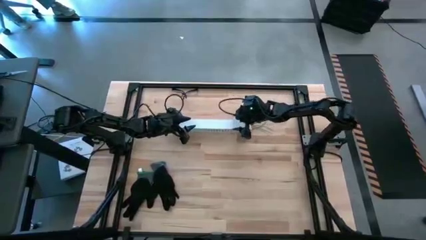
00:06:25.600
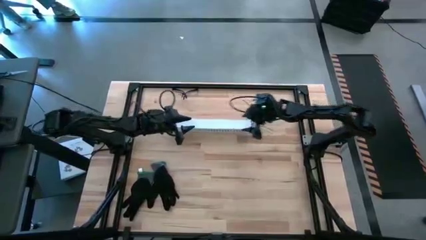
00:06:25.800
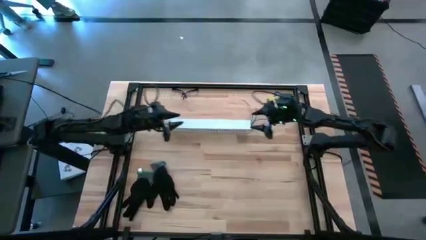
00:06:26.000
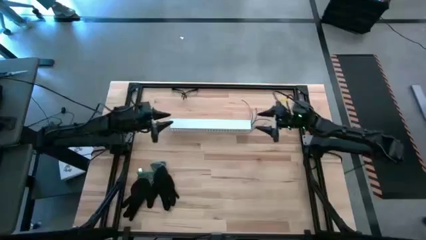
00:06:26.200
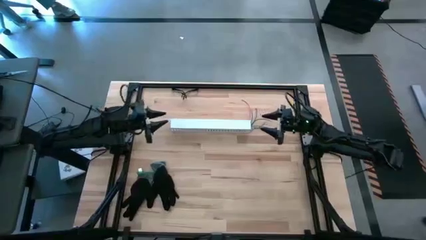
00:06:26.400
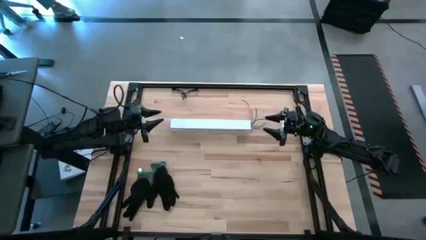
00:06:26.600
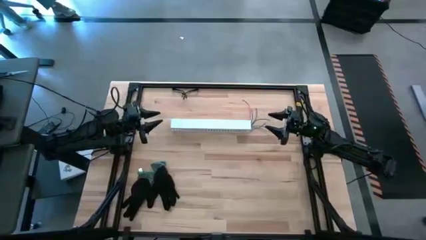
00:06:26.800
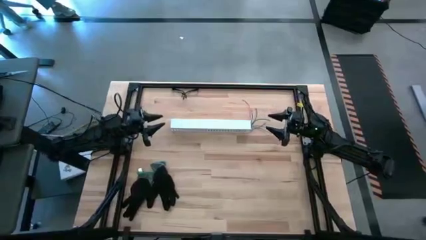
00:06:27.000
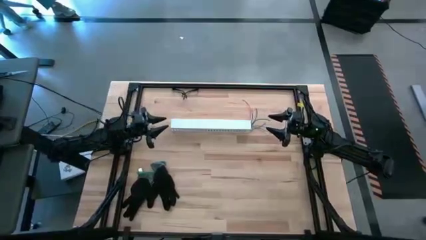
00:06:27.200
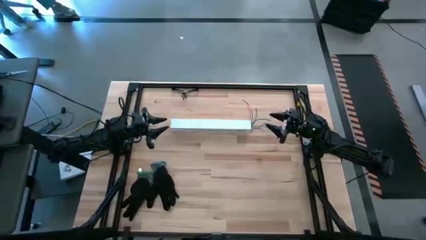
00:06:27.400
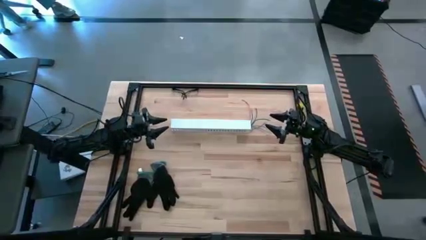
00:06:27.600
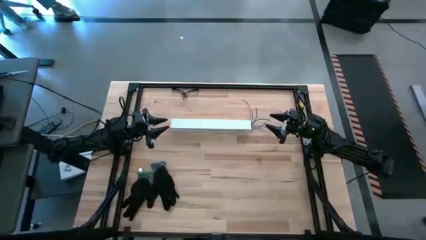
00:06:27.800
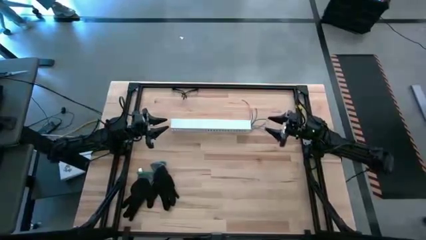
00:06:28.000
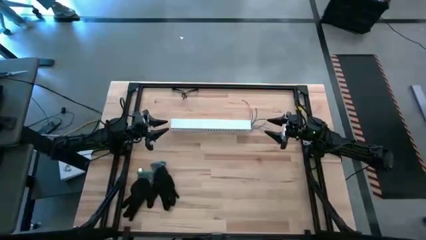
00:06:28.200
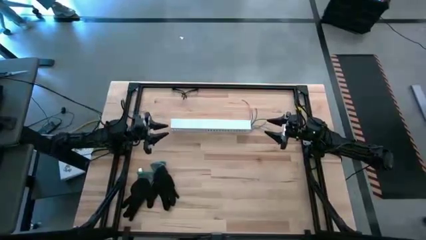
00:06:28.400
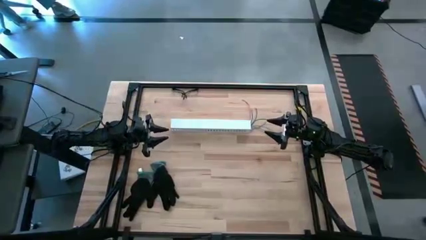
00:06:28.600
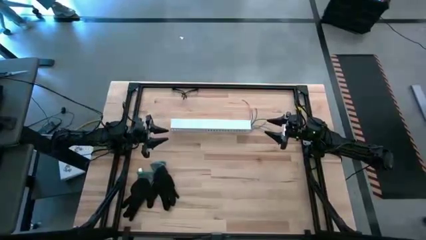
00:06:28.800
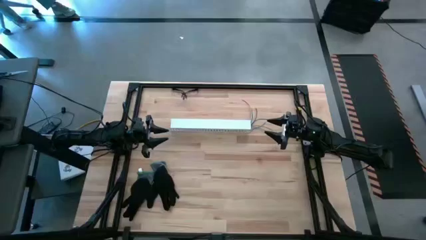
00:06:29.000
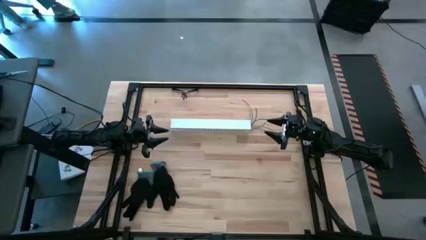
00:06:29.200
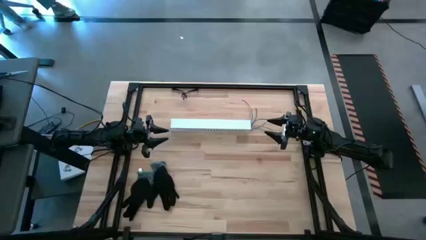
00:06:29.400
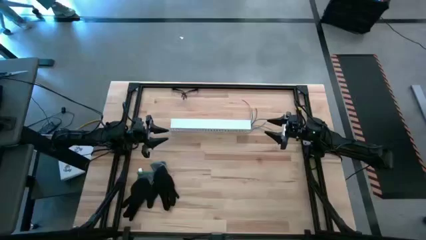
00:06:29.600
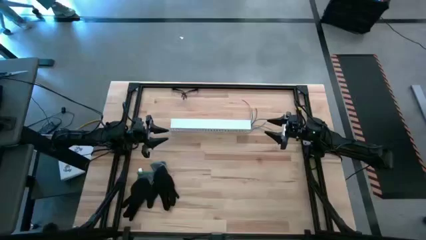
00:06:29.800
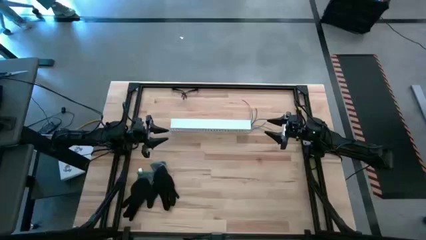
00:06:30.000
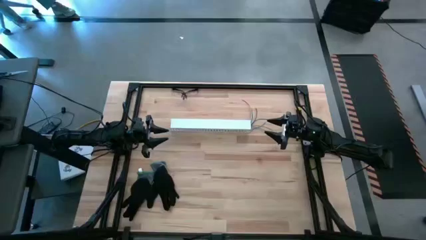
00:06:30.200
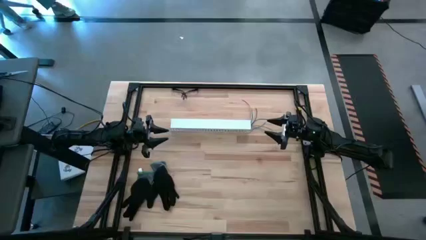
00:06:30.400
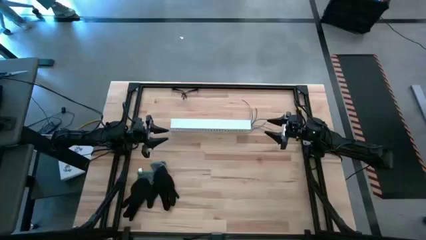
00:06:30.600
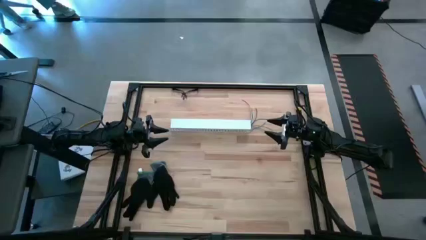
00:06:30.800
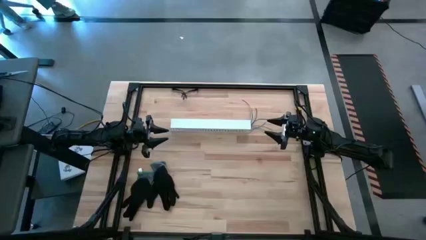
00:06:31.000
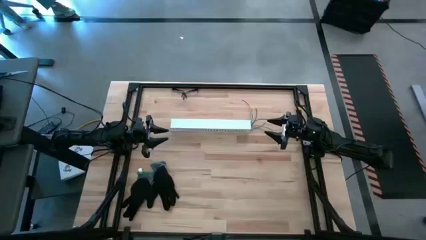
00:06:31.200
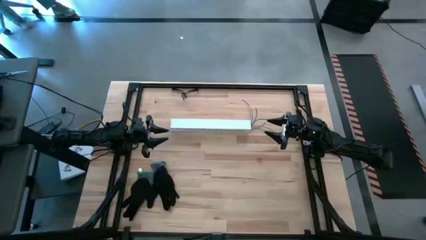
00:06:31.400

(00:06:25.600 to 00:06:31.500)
Task: Ziptie cables
Return to Home Position

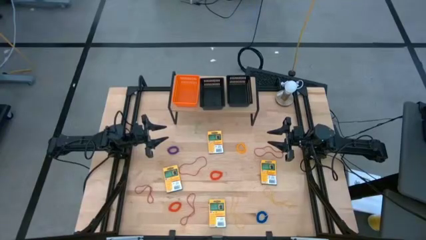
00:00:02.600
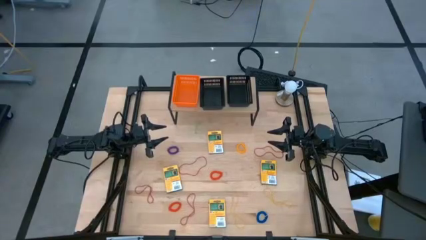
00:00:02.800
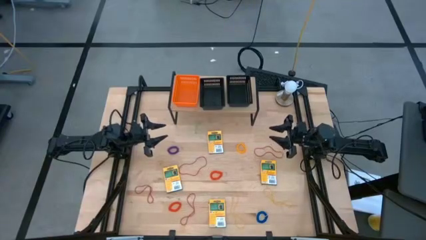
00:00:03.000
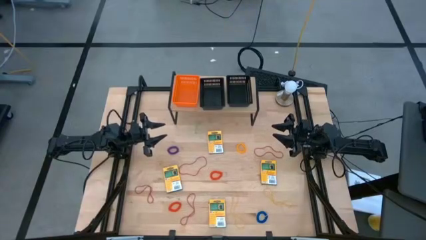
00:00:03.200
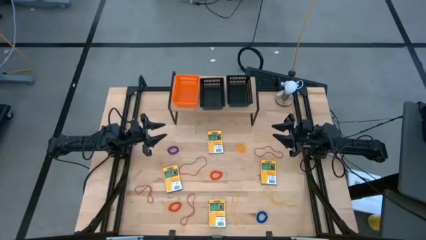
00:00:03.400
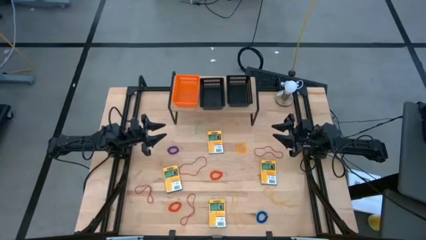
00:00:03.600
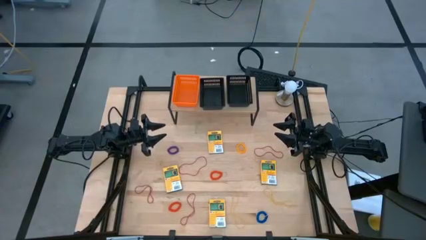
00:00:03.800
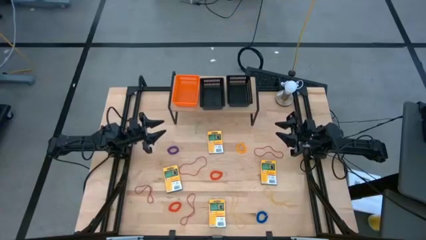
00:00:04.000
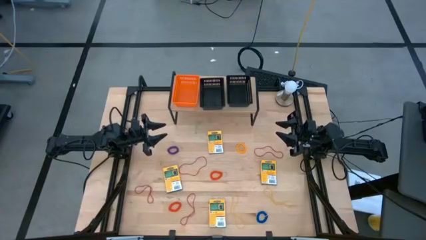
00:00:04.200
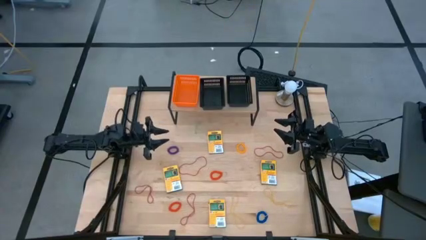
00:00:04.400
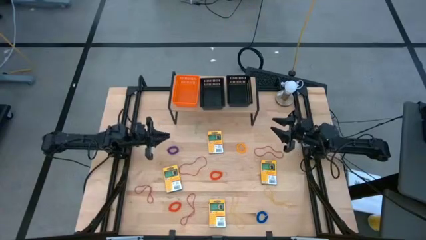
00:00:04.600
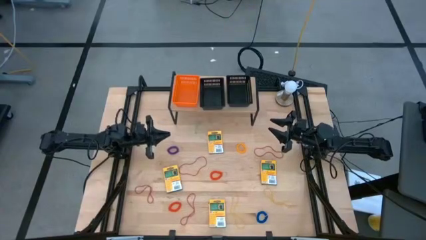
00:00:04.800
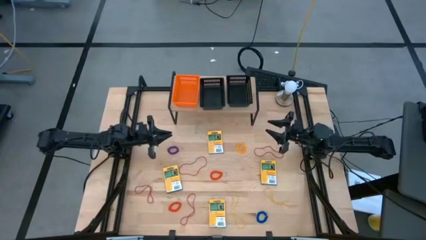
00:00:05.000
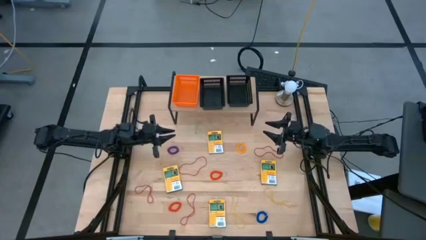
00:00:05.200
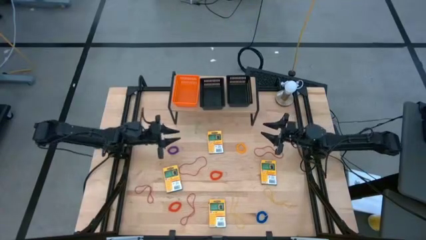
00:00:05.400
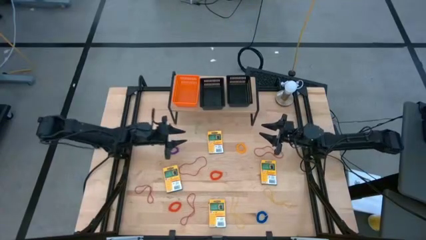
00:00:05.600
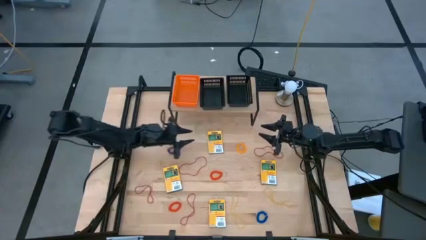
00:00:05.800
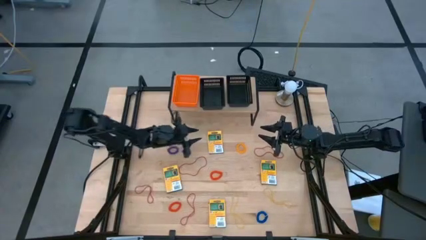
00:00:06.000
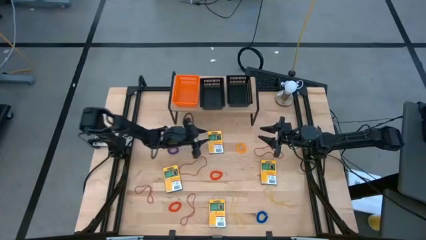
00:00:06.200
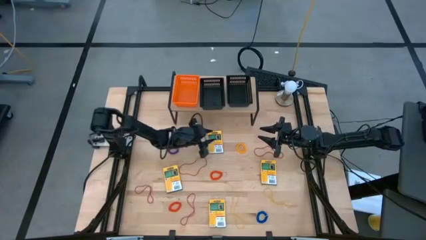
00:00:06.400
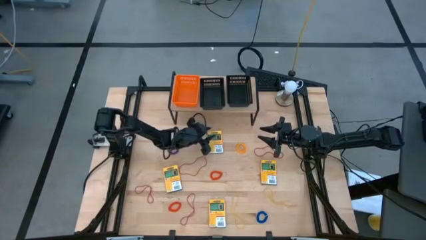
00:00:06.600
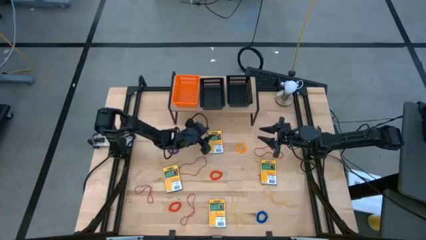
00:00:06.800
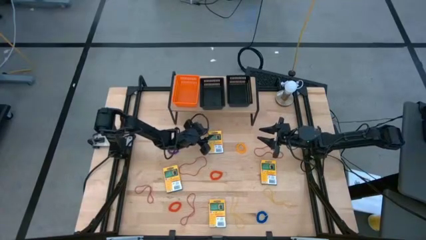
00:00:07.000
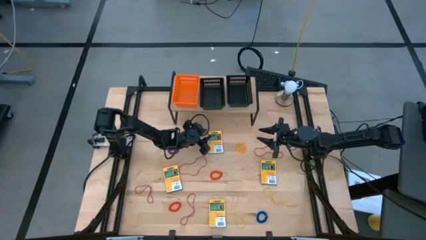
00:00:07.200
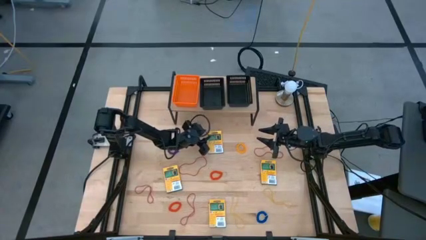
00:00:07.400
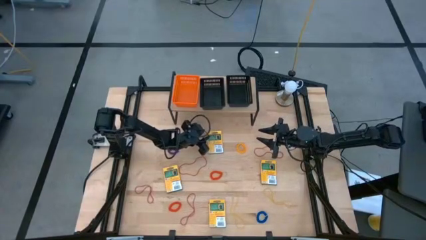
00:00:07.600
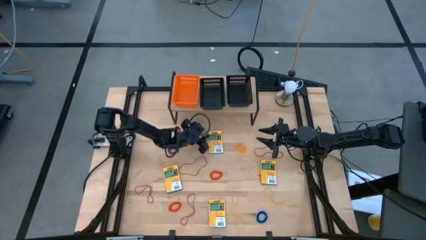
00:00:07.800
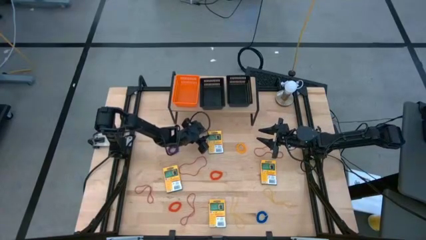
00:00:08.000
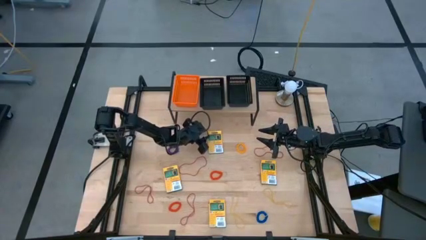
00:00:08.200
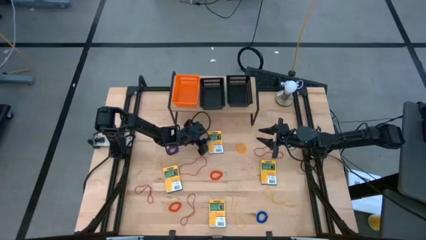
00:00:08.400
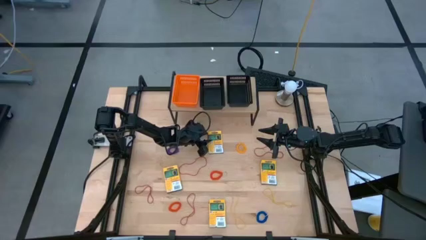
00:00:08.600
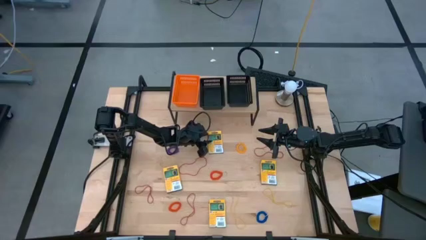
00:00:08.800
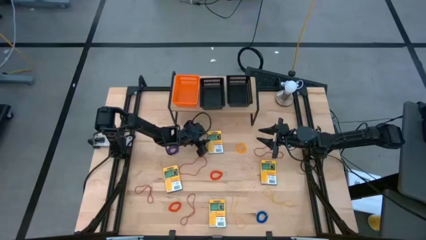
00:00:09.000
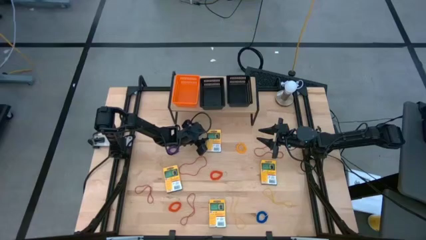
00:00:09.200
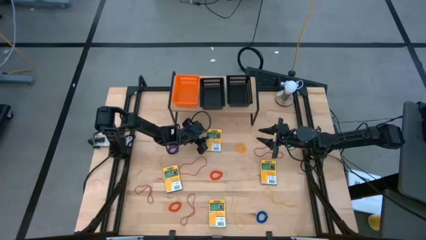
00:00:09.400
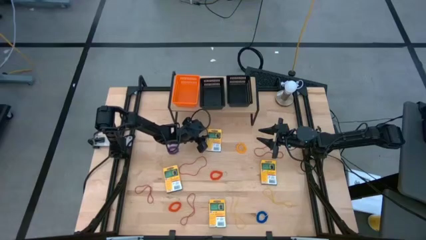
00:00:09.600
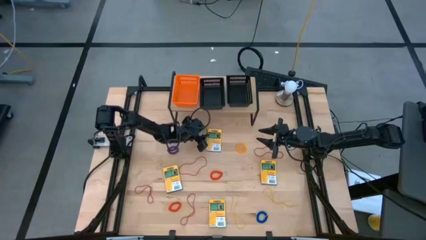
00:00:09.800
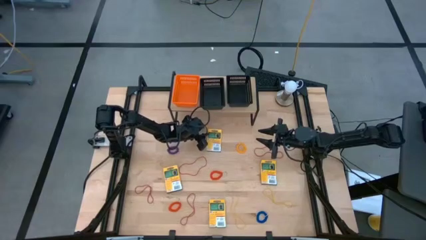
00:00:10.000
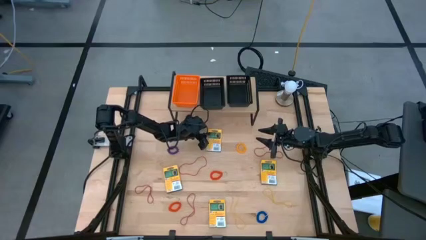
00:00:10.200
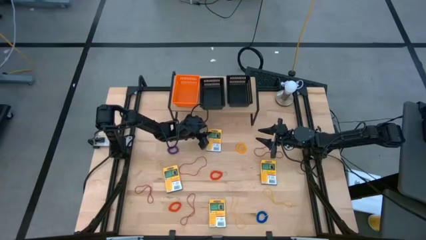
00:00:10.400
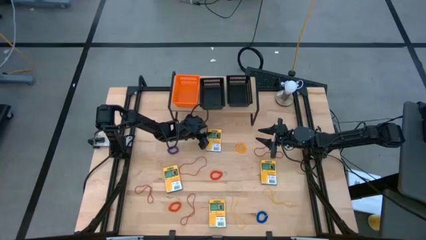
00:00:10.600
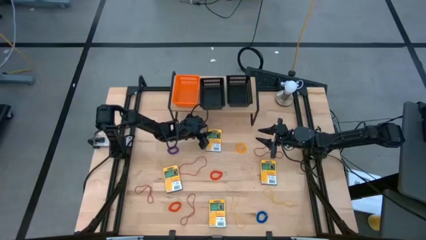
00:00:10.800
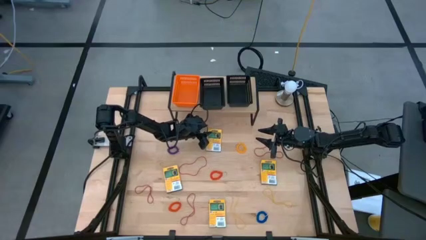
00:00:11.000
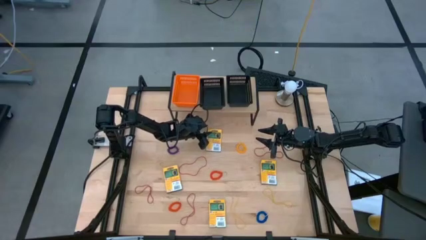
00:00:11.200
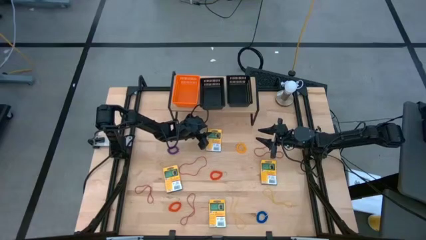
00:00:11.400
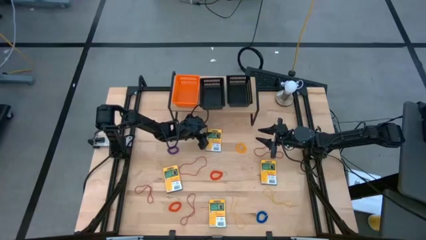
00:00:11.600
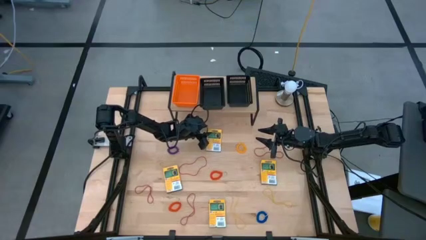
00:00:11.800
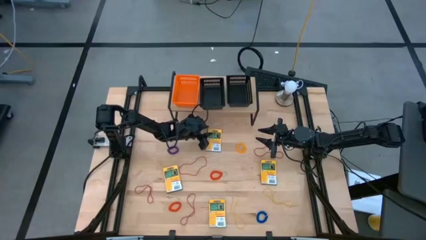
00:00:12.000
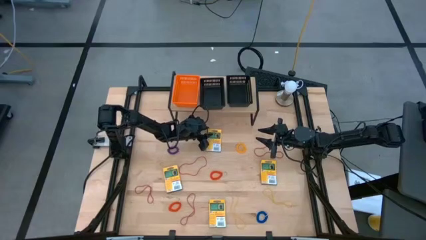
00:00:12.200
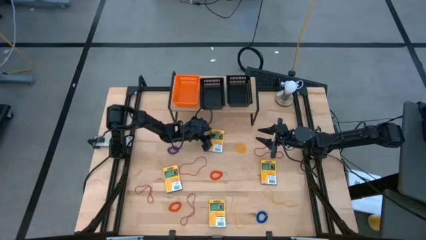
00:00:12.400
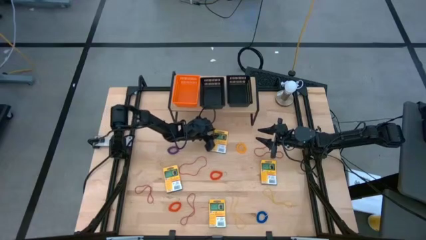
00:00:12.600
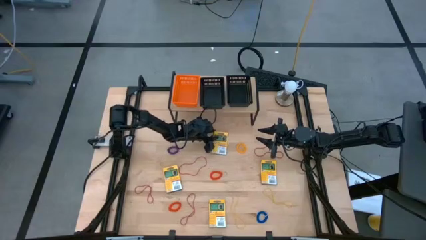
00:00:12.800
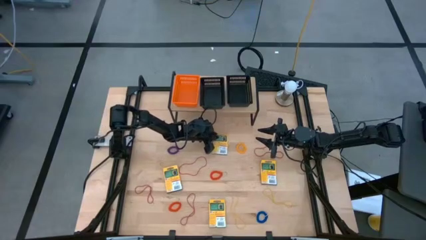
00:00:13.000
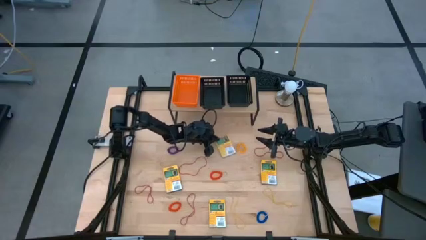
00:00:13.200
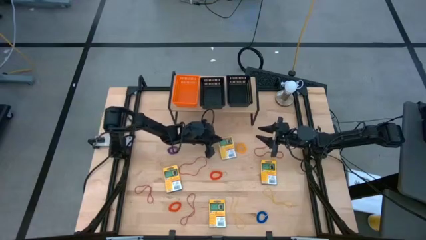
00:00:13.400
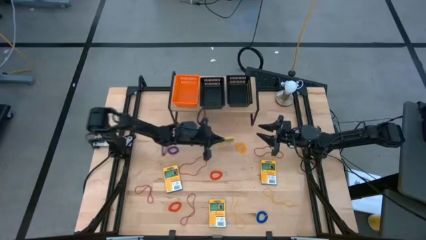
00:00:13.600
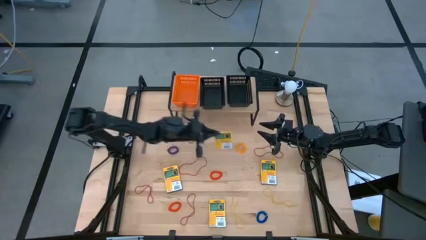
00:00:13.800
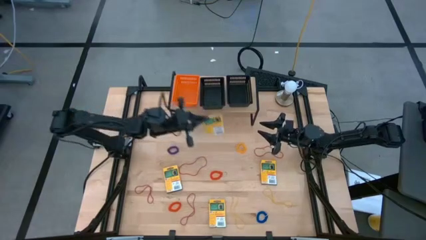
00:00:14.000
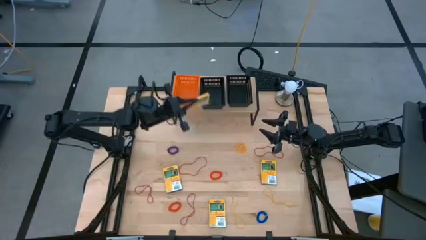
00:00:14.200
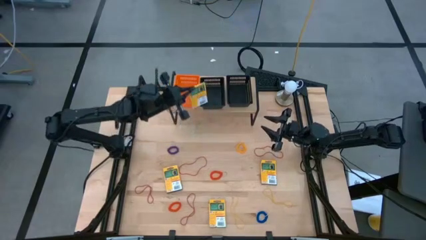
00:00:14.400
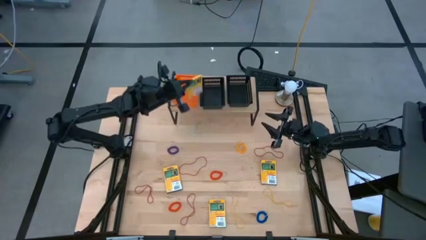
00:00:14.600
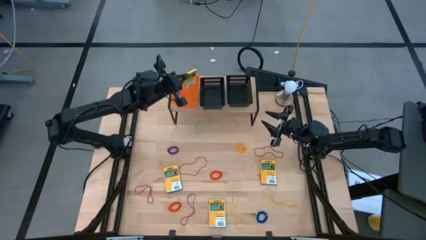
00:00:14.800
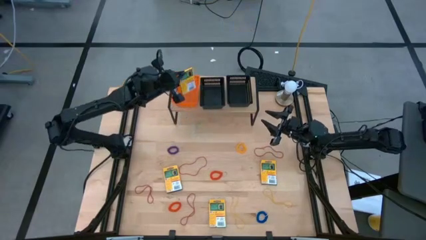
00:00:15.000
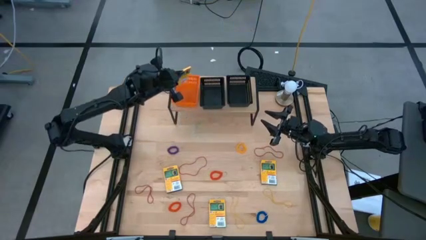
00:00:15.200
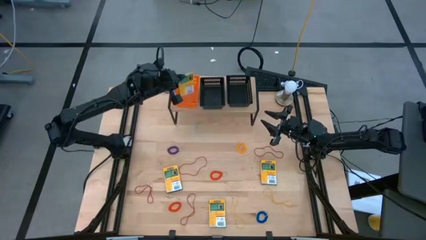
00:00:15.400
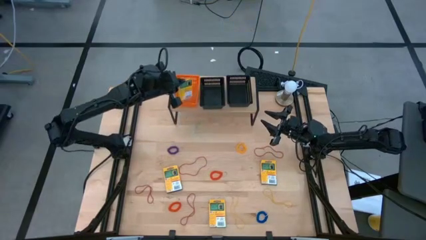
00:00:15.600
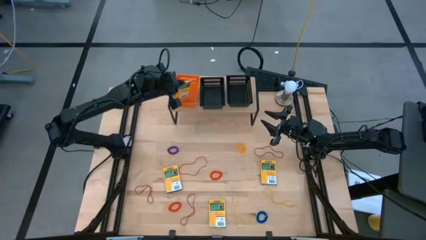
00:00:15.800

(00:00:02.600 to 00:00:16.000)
Task: Pick & Place Office Desk Supplies
Put the crayon box into the orange basket on the shelf
